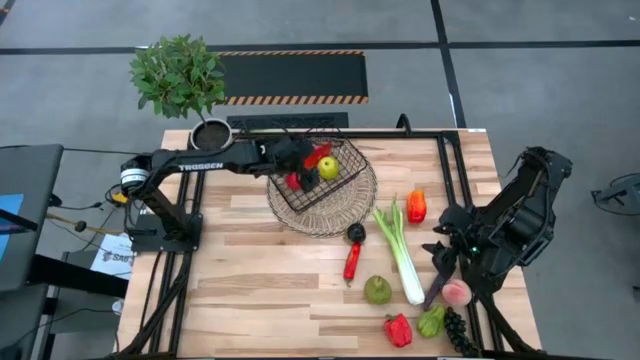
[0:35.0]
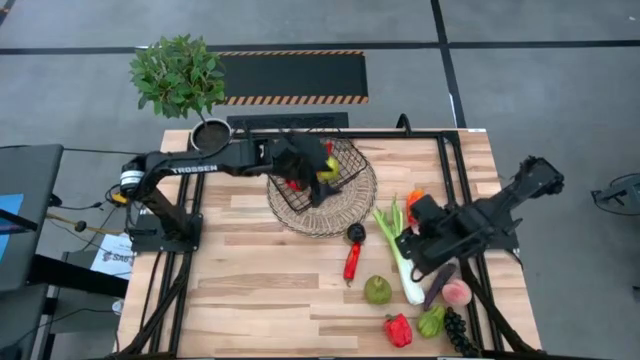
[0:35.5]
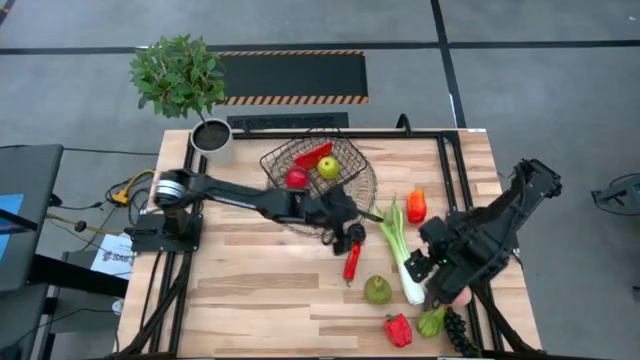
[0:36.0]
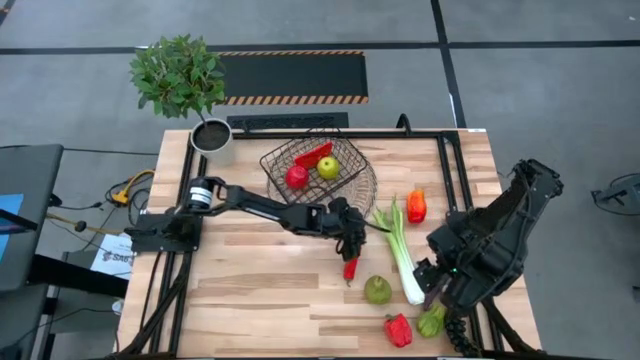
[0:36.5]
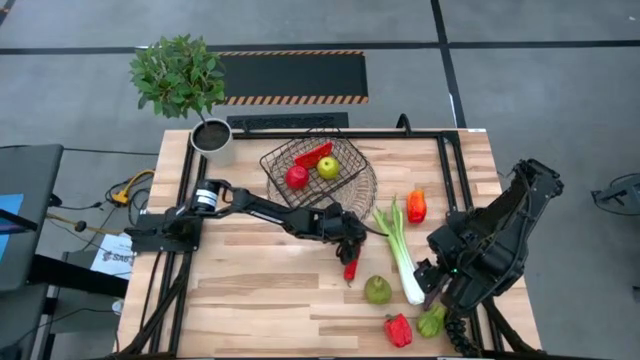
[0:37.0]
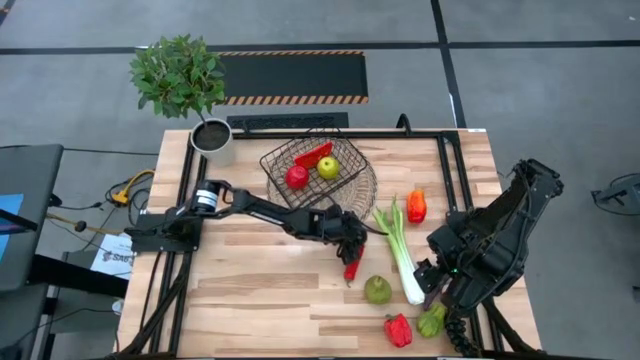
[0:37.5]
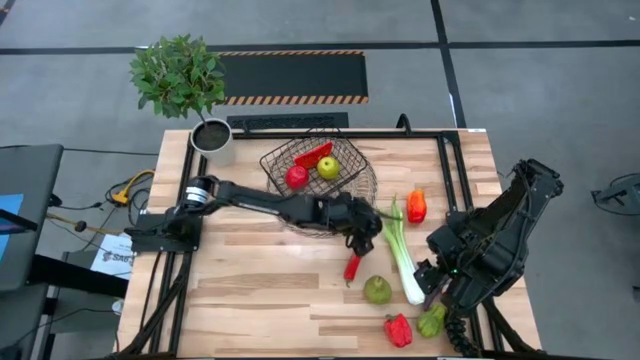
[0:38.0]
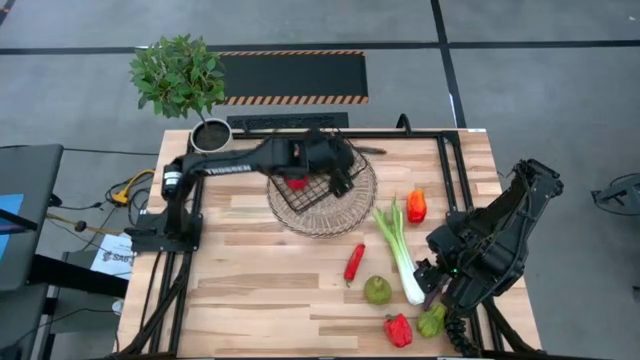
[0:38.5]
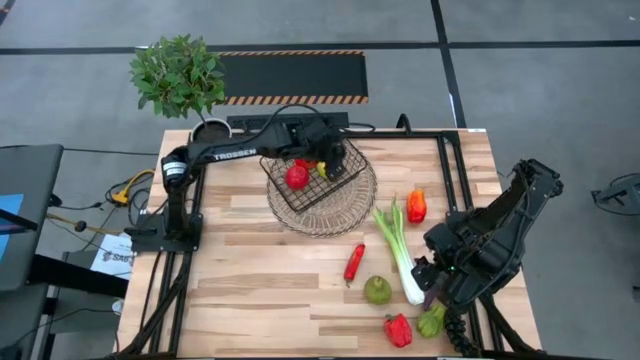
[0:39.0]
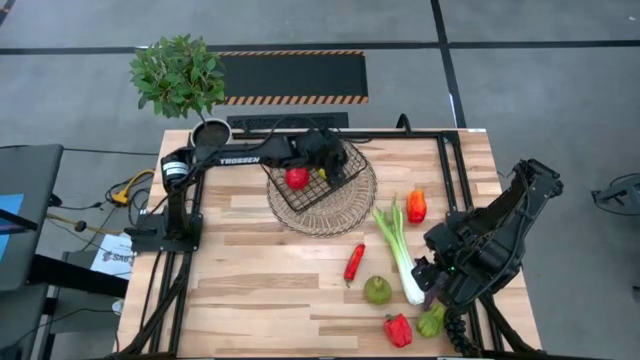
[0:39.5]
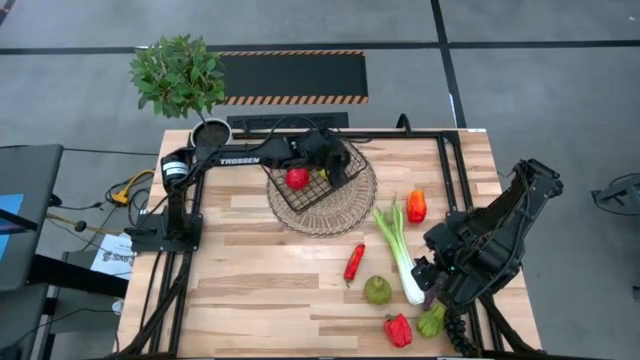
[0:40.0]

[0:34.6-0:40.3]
Task: Build produce basket
Put the black mangosteen into the wire basket

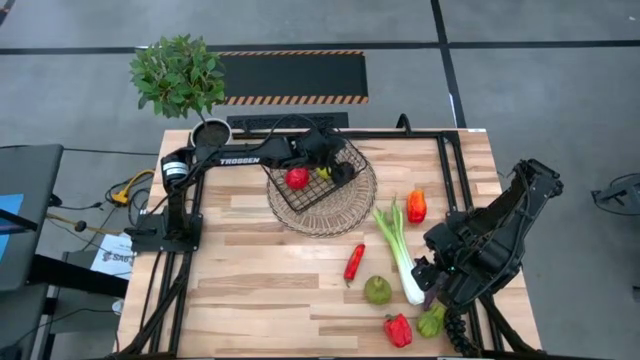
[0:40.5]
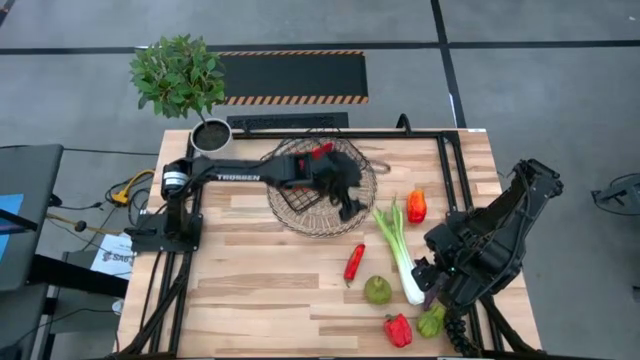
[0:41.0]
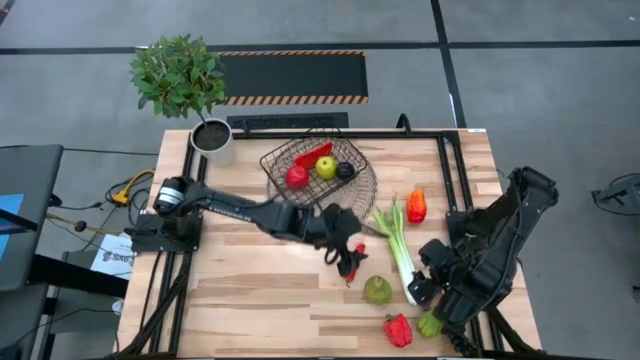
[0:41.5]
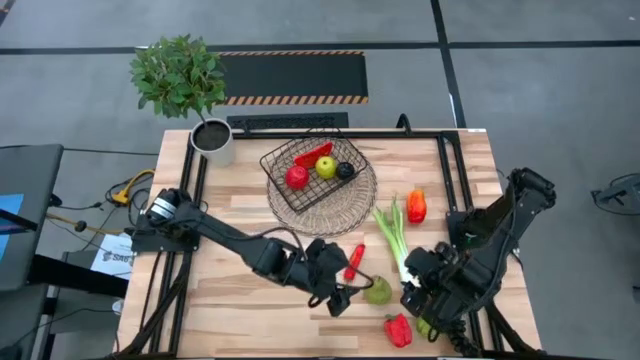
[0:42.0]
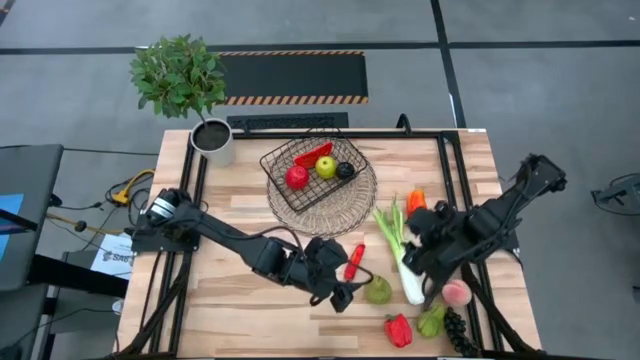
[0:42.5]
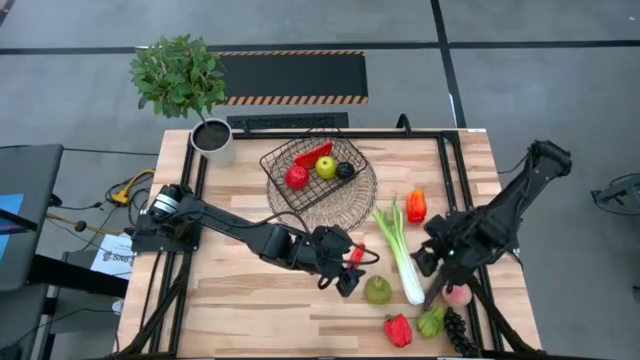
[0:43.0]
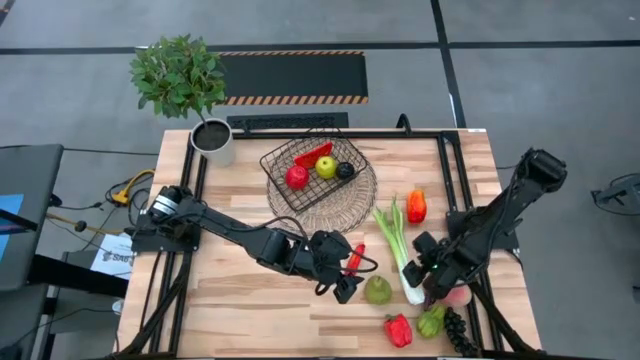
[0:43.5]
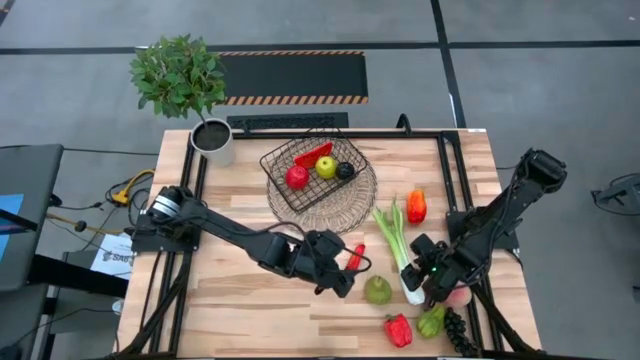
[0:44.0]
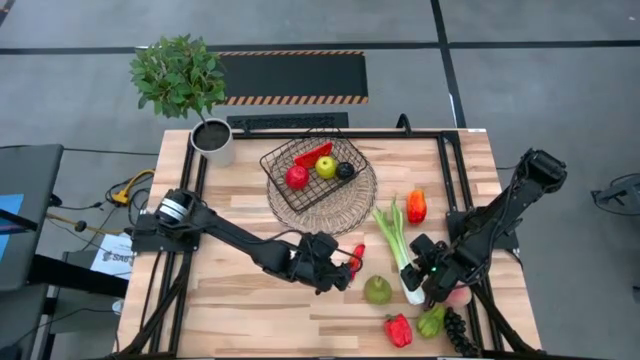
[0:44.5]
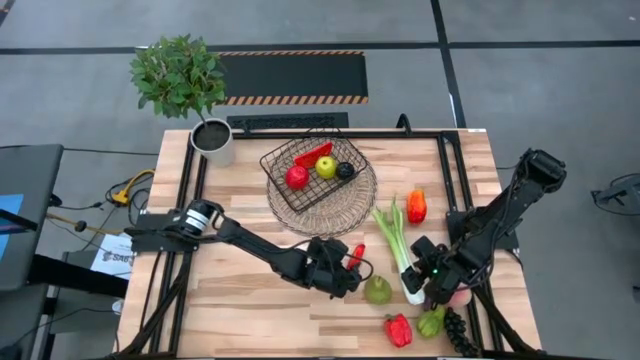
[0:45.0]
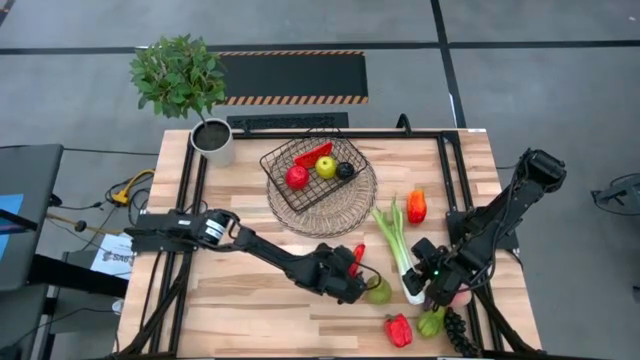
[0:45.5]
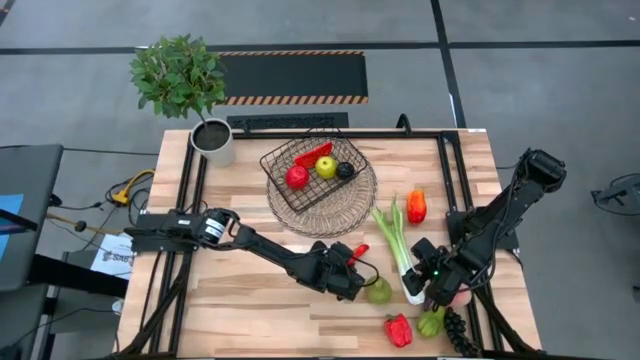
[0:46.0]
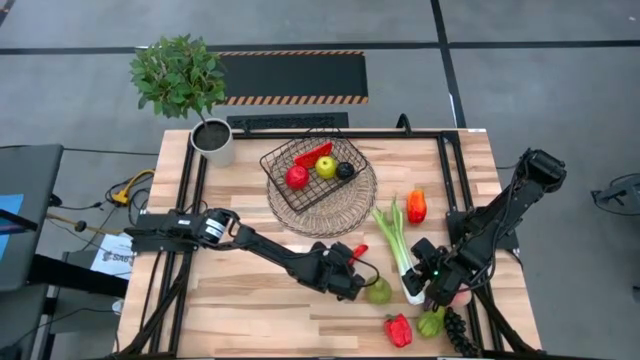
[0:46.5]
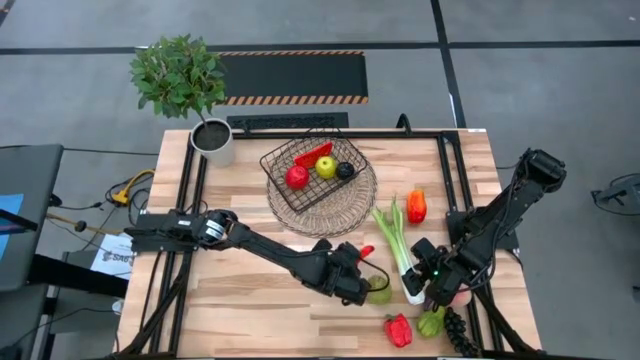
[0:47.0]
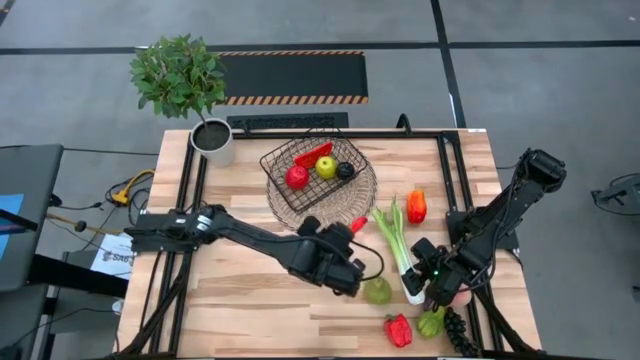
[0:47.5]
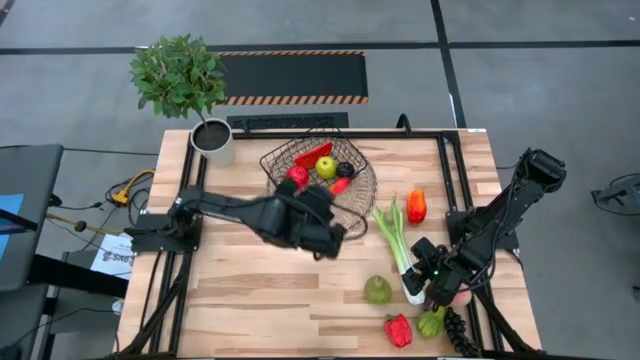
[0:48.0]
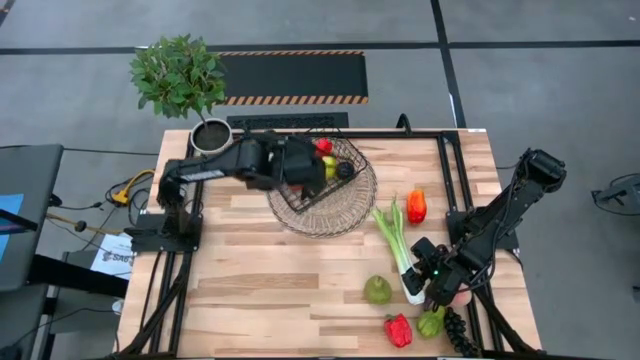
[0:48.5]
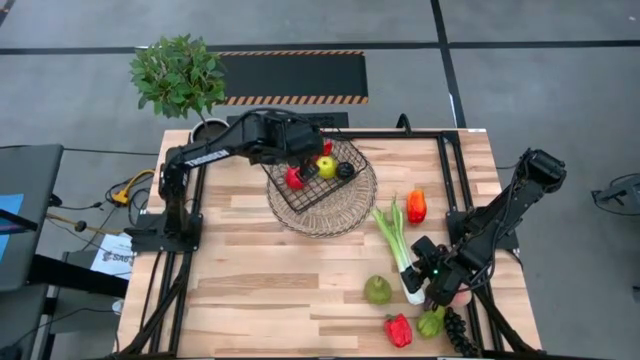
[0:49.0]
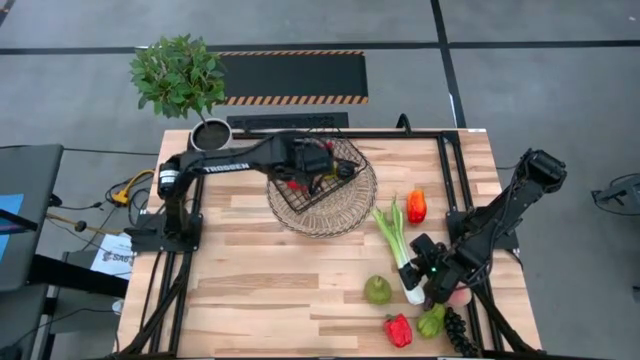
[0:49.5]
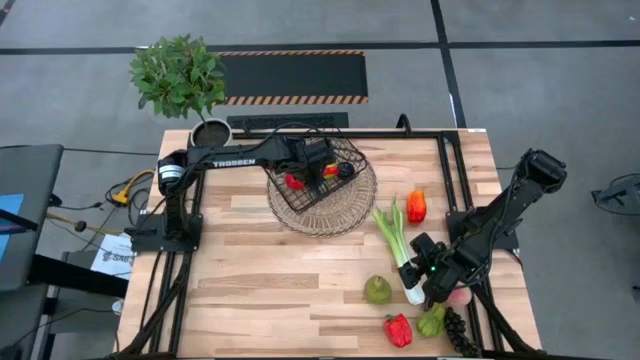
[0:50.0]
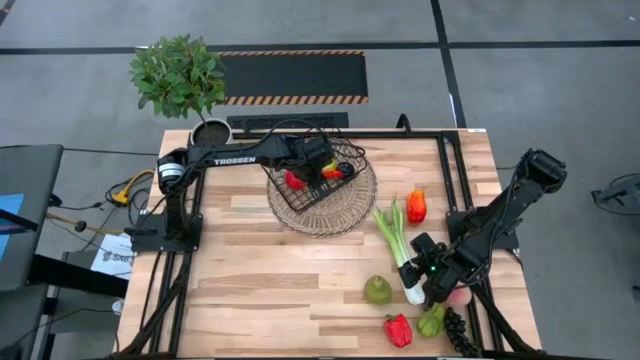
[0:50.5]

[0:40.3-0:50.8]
Put the red chili pepper into the wire basket

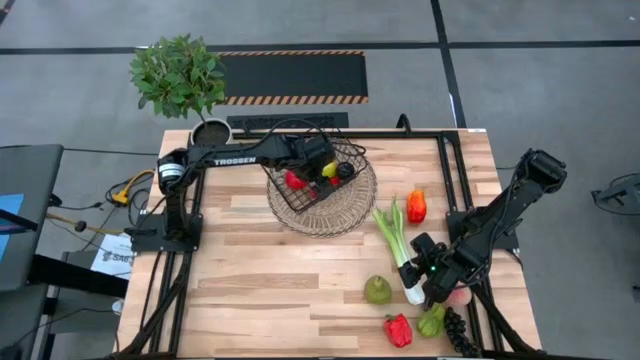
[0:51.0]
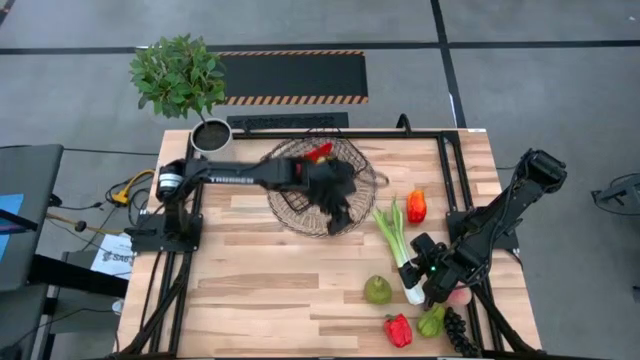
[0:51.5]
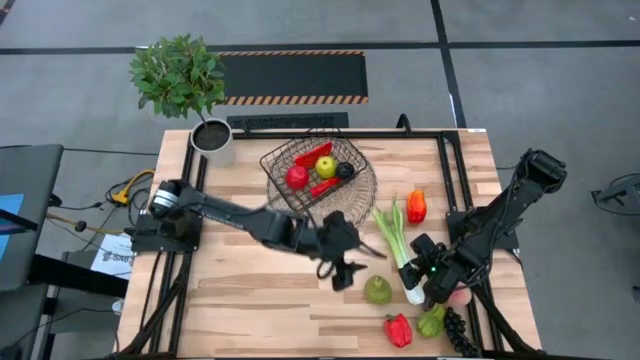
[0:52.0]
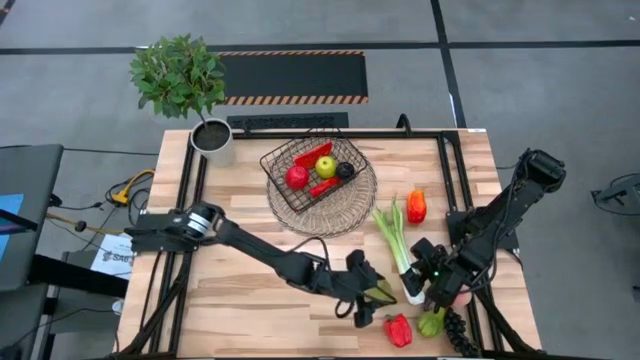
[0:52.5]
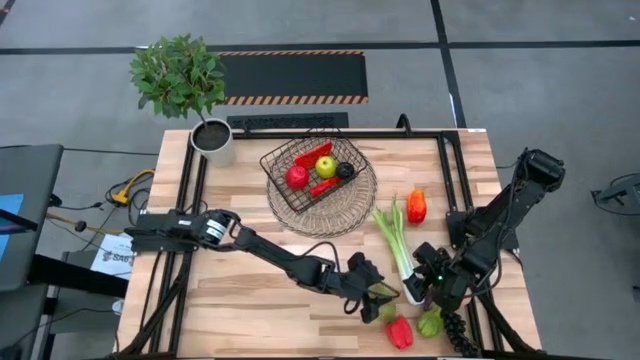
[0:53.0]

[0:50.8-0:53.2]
Put the green pear into the wire basket

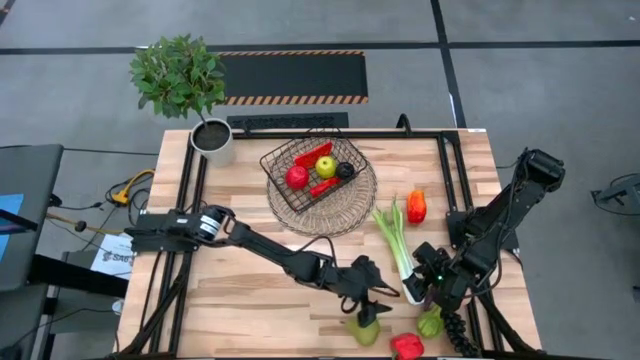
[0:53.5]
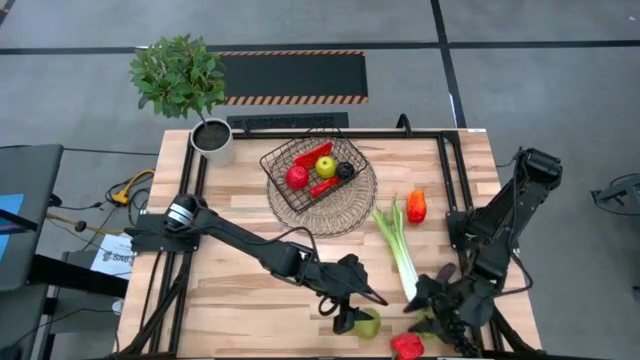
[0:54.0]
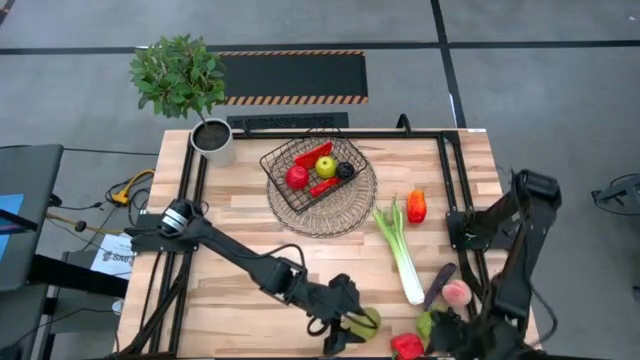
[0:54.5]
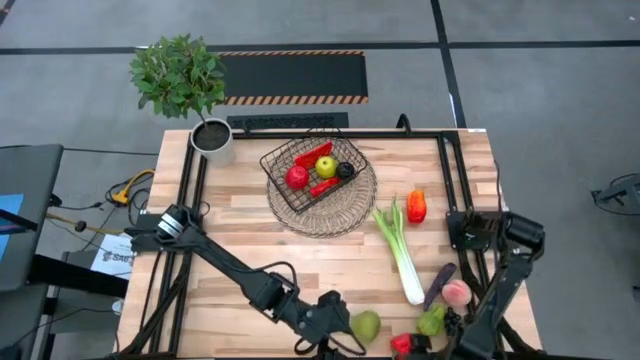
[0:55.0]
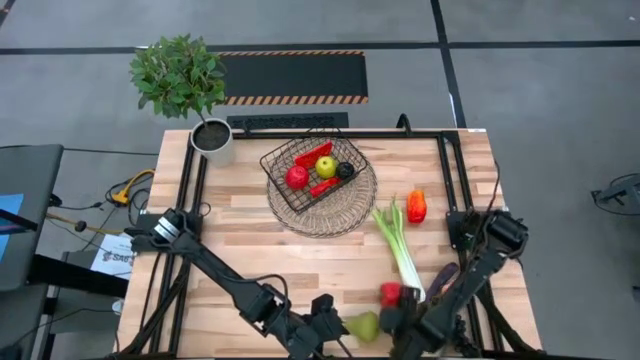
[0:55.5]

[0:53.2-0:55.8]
Adjust the red bell pepper
